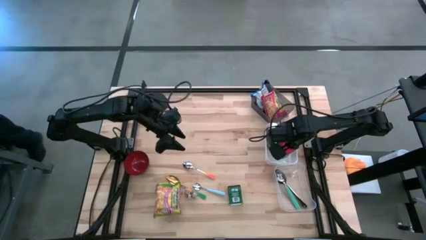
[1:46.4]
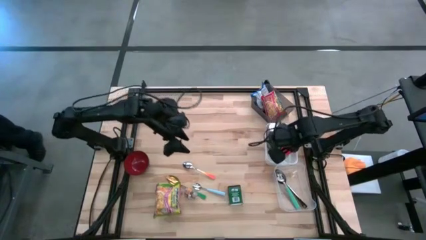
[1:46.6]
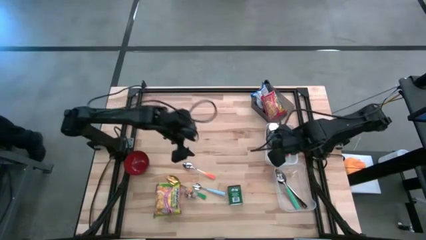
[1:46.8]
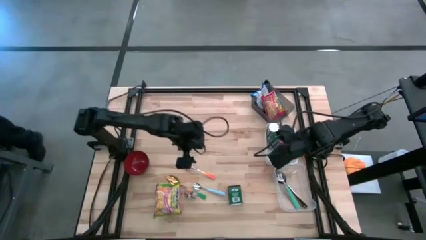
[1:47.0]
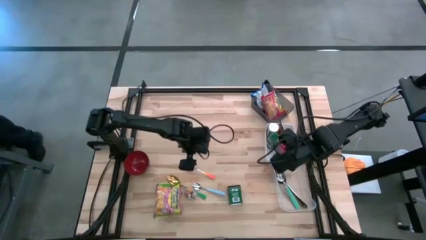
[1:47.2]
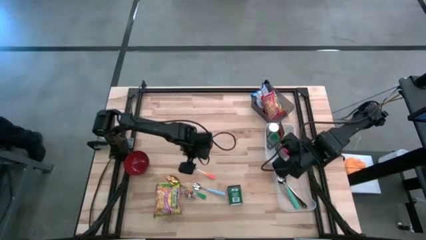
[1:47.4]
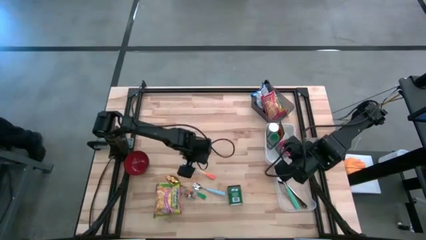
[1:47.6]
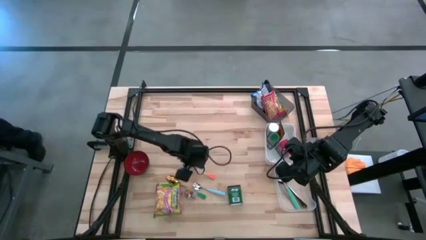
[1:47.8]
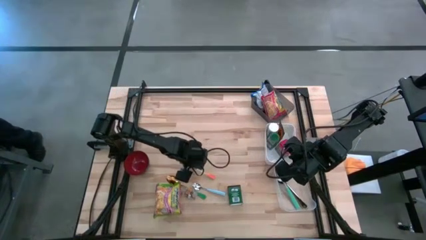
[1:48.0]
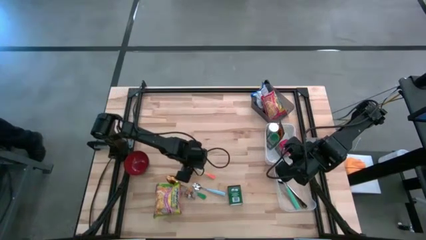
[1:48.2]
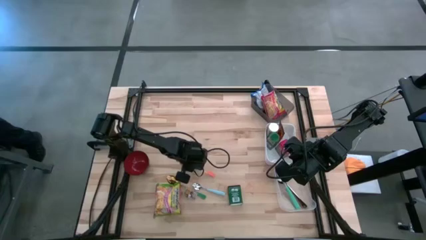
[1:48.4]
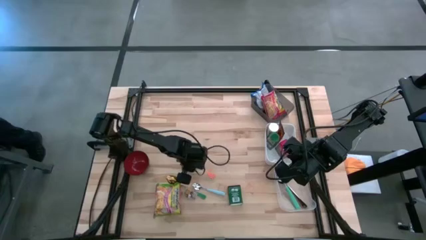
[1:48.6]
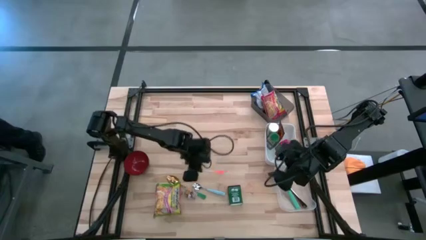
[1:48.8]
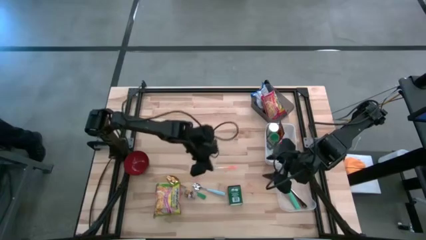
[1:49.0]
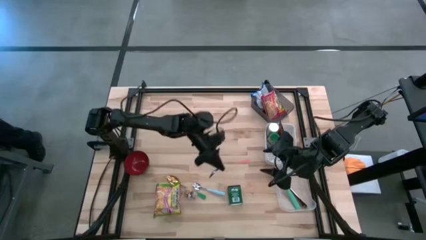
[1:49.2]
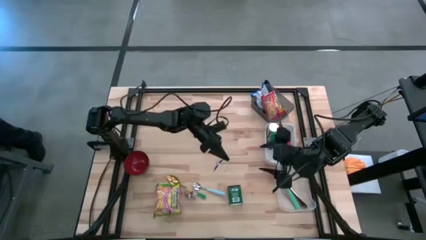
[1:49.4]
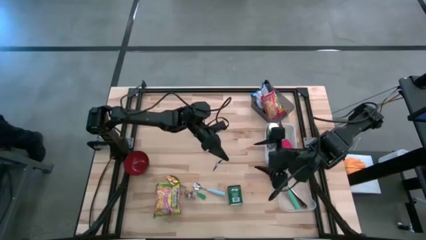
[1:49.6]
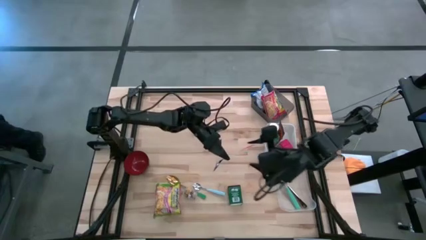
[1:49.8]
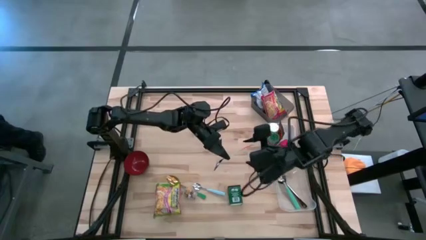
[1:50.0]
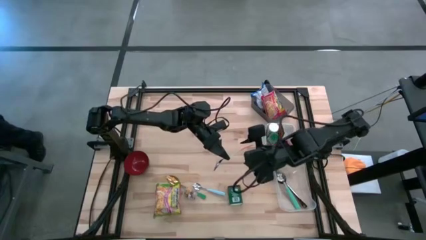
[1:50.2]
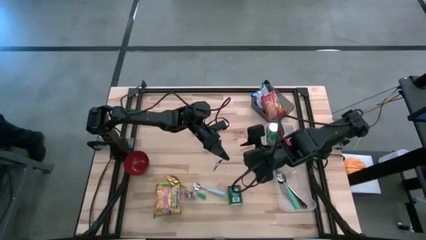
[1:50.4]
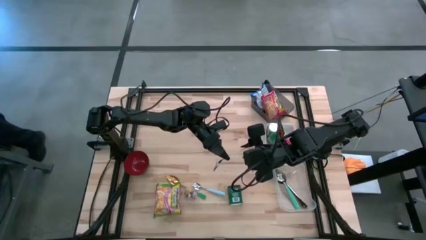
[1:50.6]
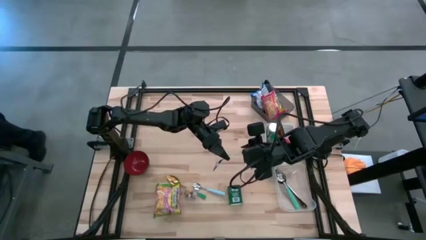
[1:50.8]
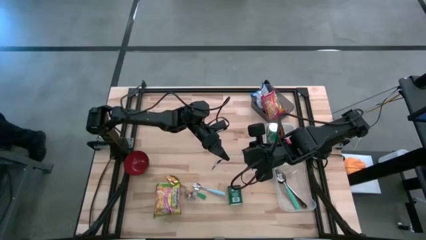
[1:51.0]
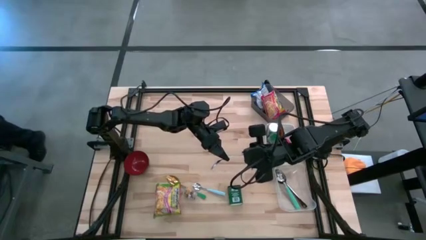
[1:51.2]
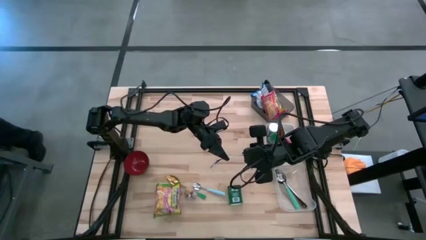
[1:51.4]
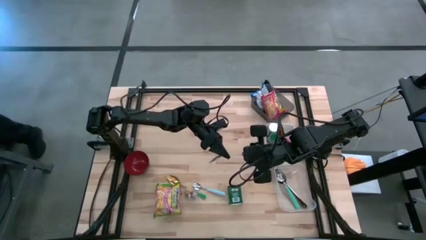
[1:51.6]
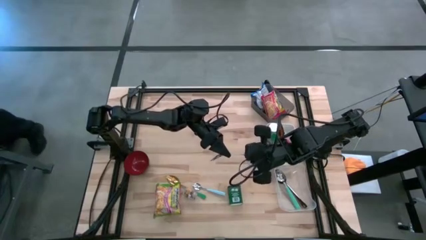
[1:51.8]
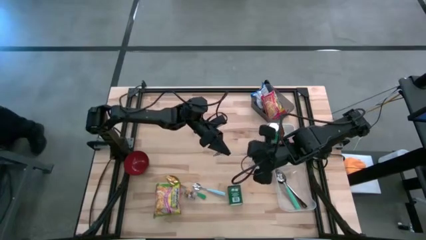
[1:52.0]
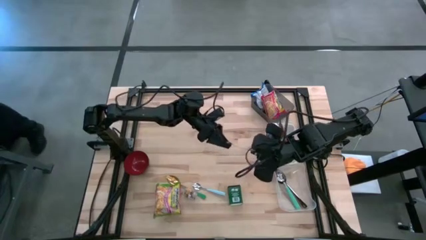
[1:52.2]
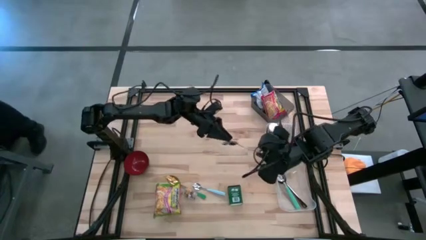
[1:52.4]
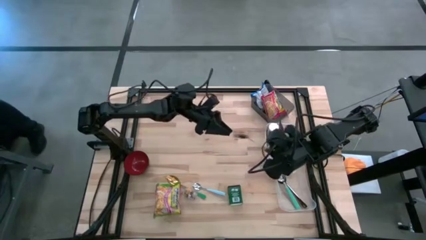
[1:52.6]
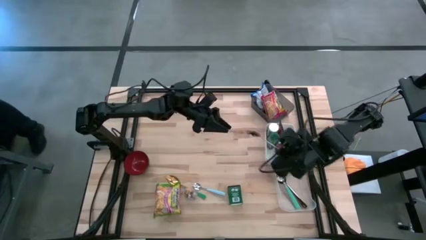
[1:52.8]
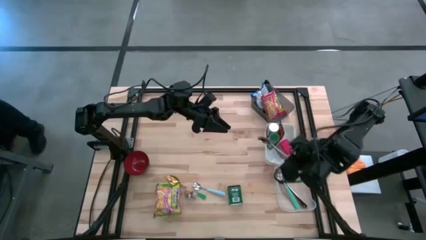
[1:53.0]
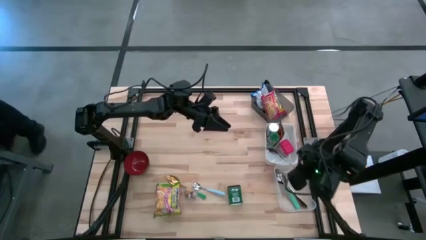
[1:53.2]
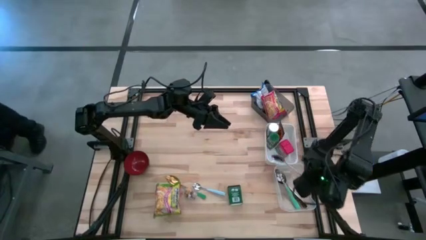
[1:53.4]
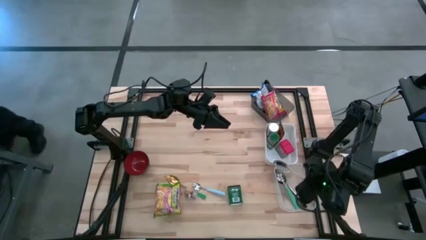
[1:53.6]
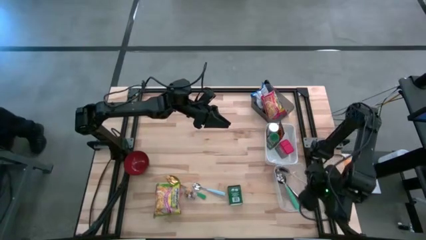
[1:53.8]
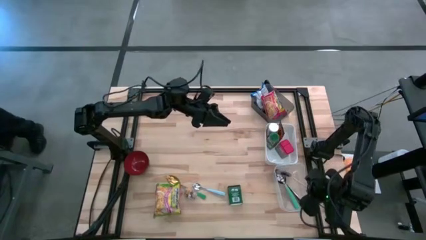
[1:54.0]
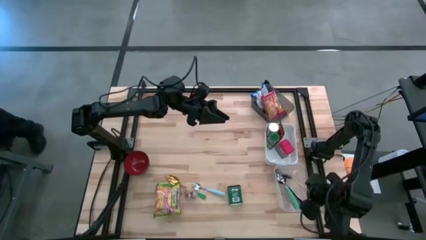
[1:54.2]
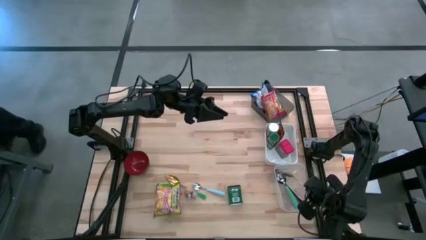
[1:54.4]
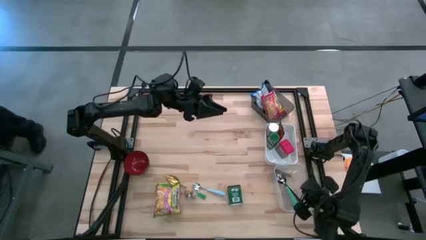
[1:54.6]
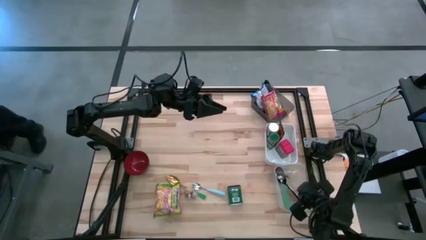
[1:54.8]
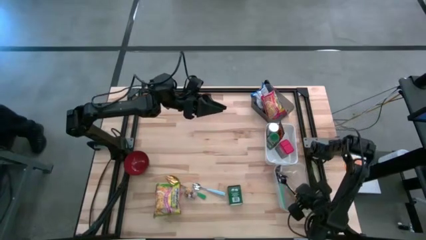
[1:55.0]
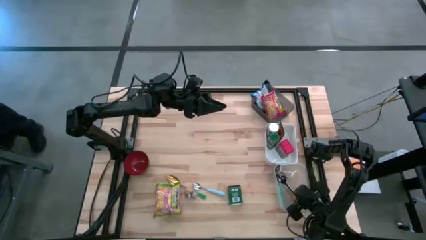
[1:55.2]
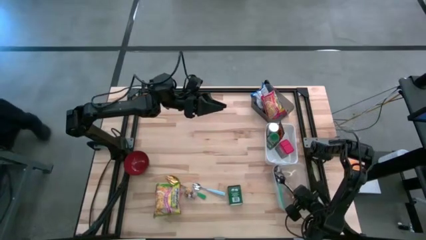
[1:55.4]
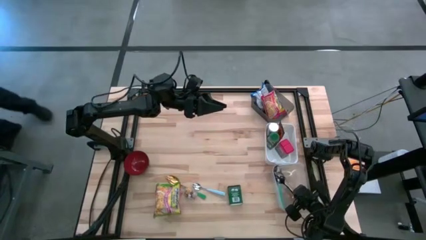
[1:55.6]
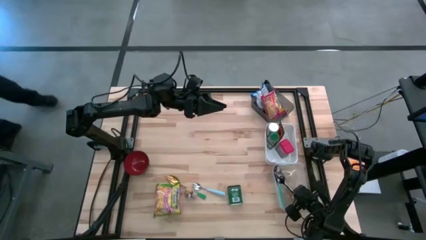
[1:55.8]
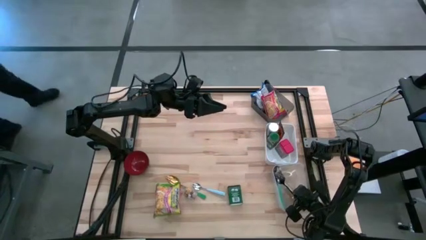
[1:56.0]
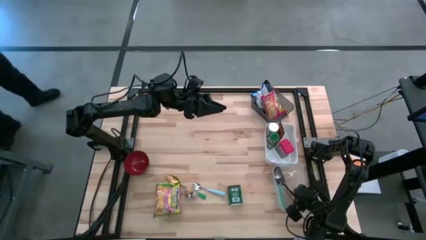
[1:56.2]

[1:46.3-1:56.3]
Put the orange spoon into the transparent bin
